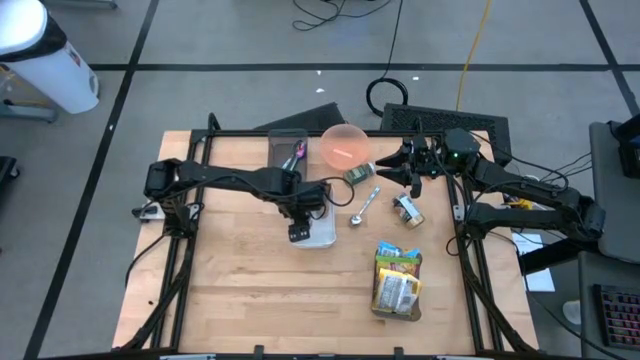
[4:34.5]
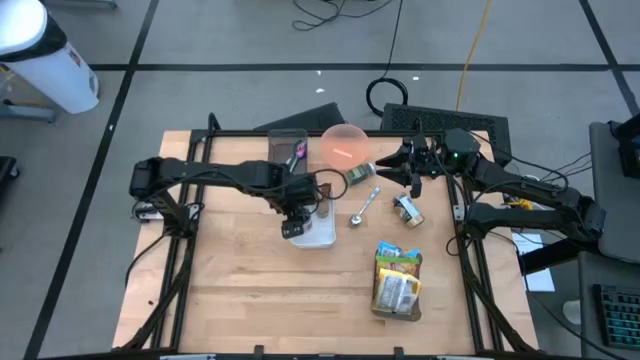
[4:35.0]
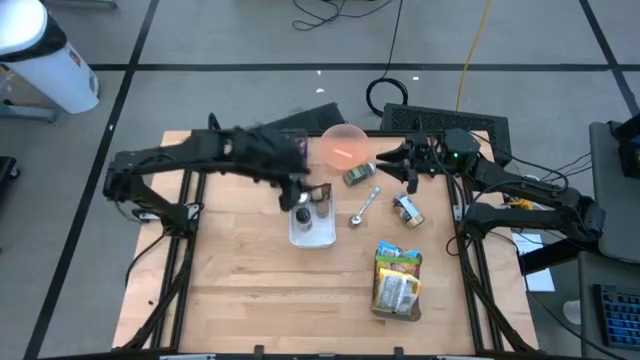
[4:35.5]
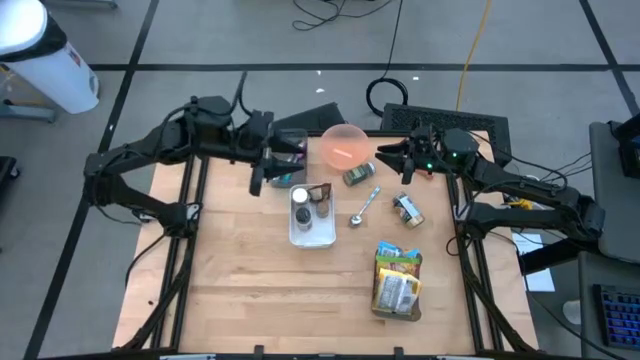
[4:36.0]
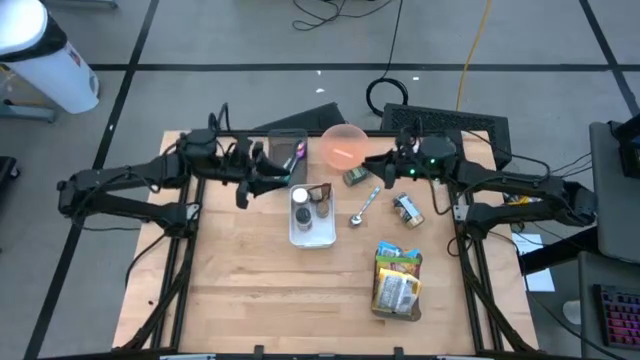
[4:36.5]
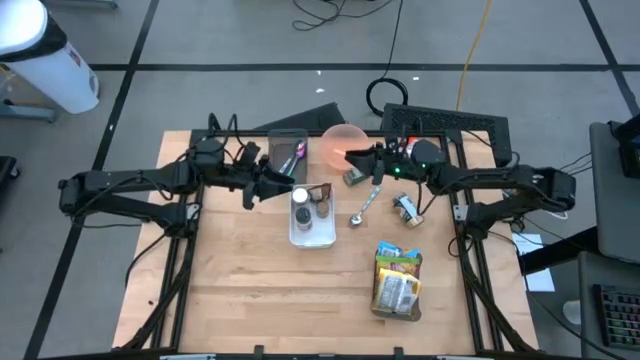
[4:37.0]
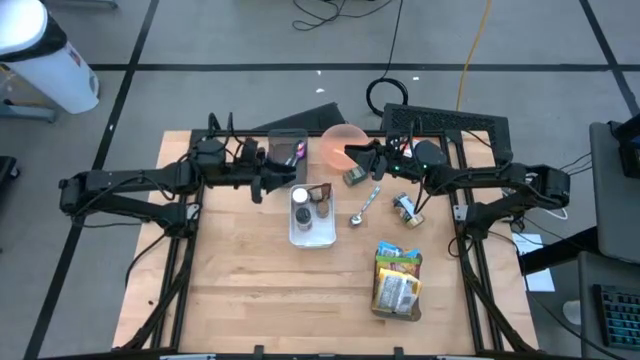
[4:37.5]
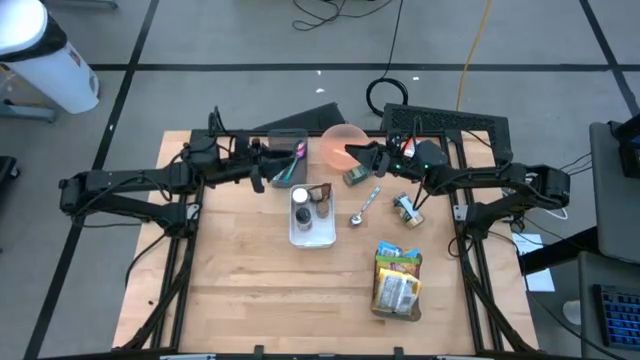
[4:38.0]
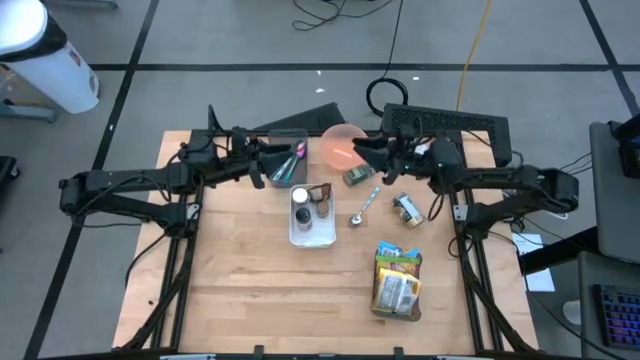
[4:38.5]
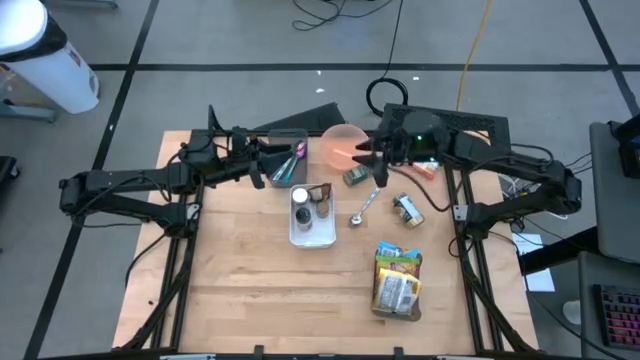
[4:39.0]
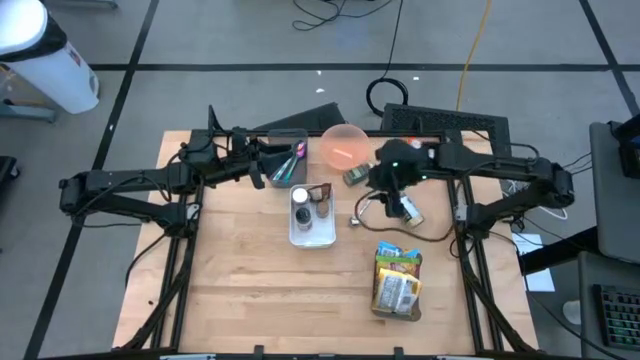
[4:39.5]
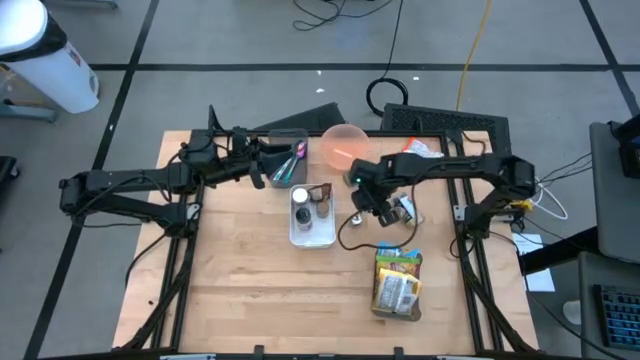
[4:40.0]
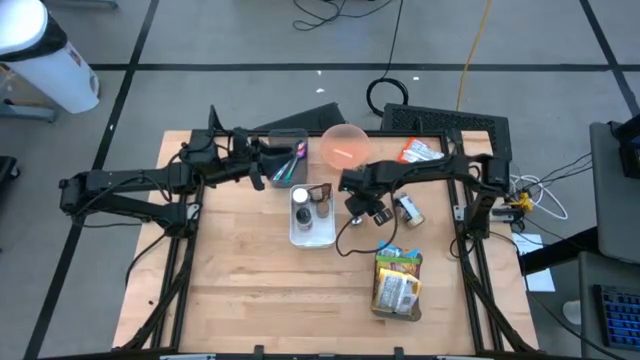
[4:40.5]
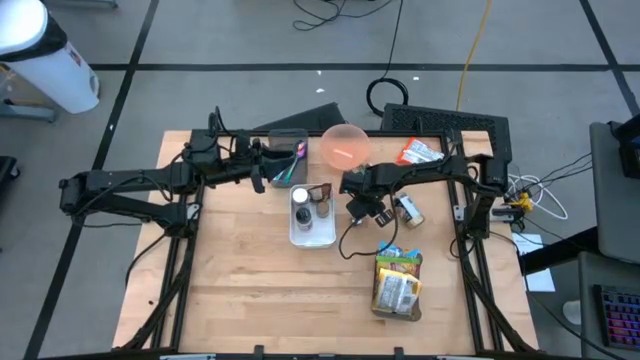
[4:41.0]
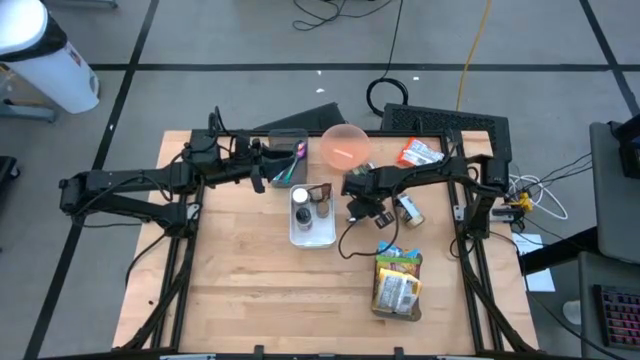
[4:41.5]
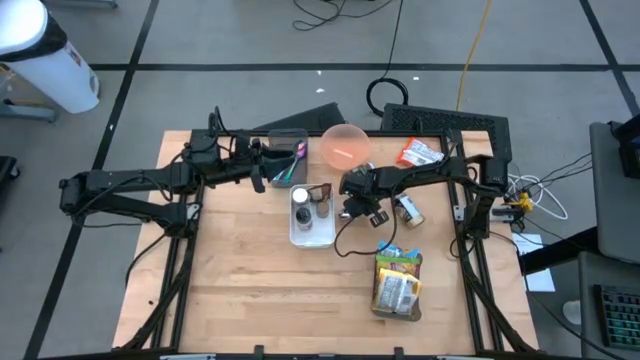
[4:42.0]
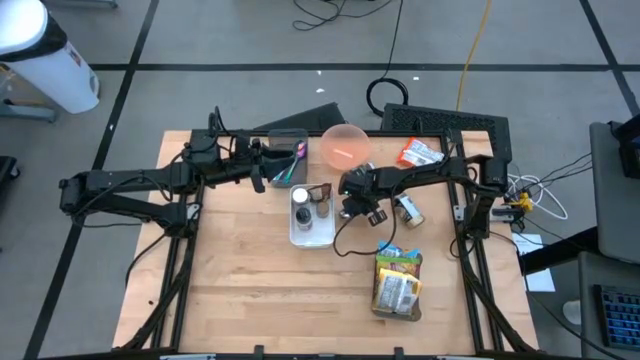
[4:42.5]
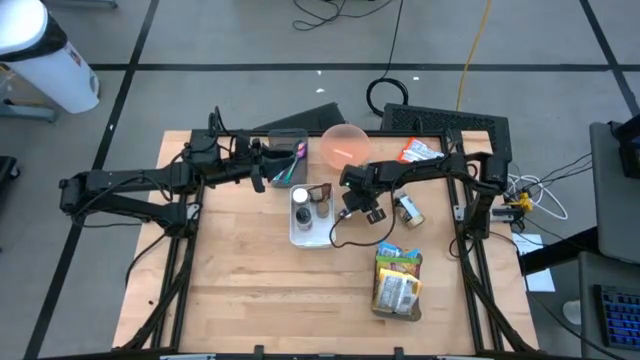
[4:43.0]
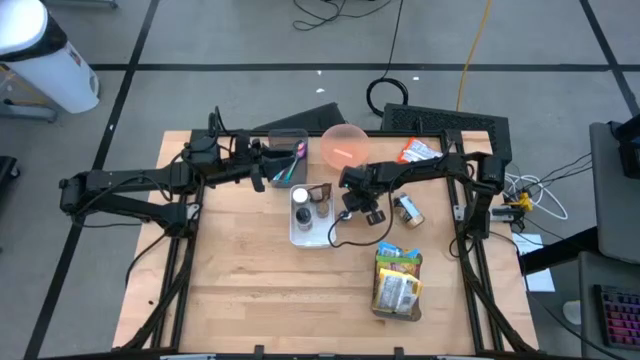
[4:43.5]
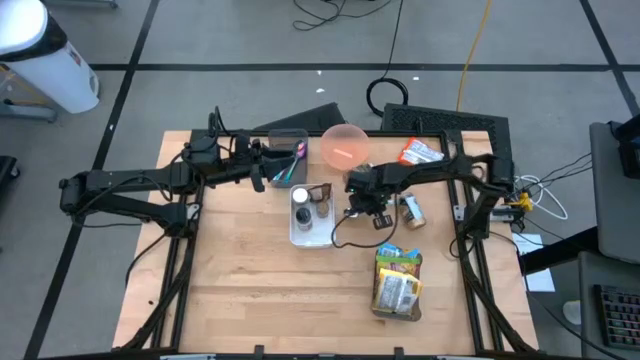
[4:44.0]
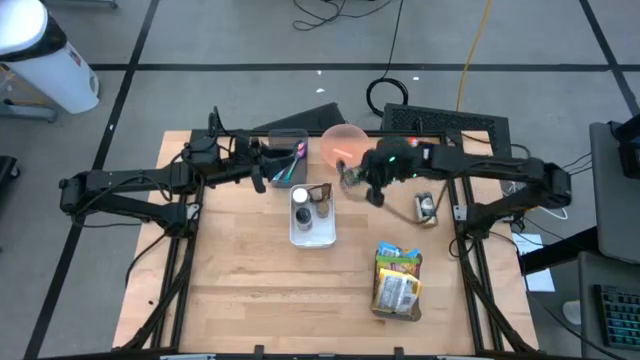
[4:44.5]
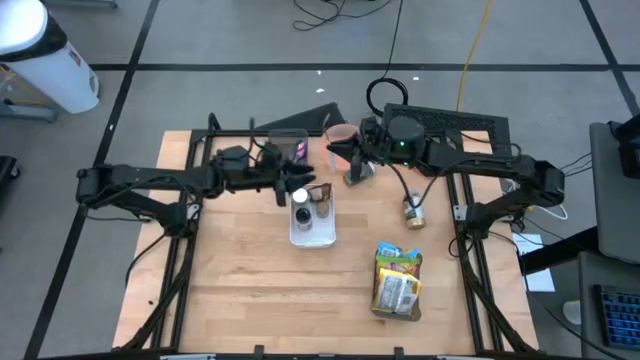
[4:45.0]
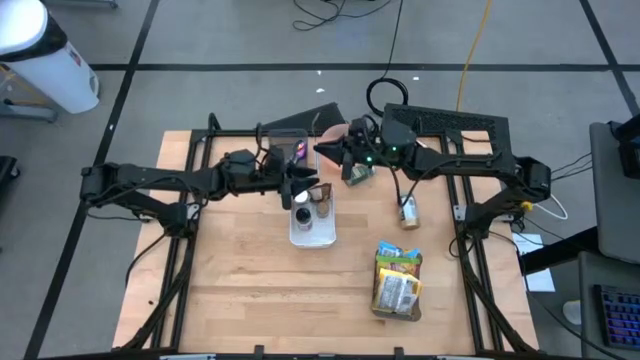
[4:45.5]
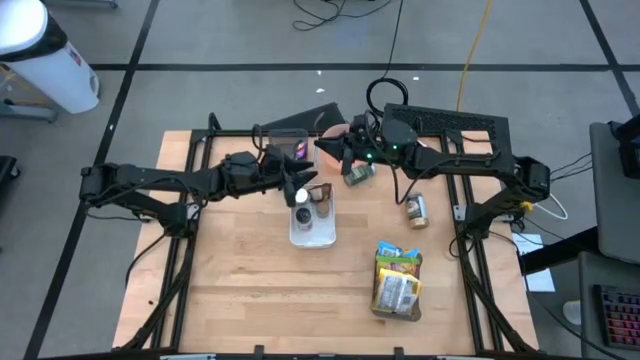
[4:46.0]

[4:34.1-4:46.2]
Task: Pick & Place Food Item
Put the blue pattern spoon into the top black transparent bin

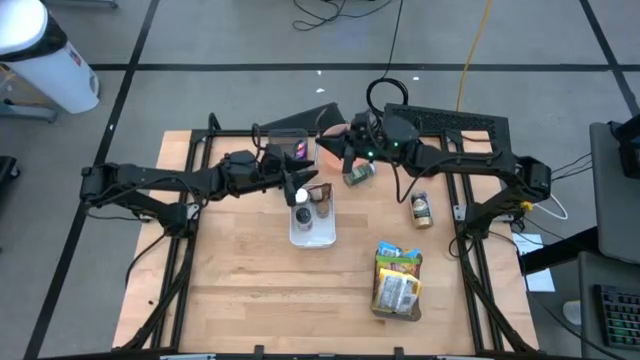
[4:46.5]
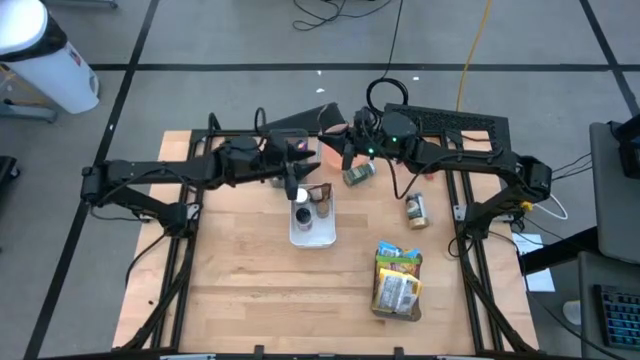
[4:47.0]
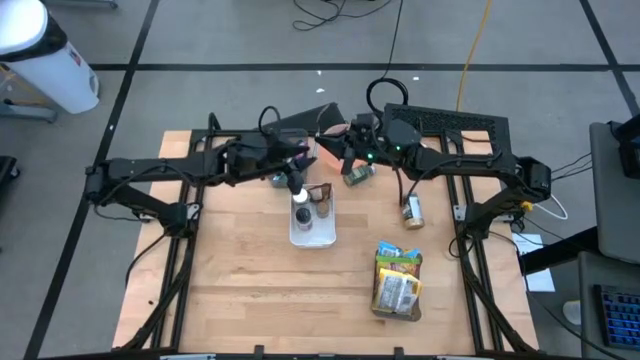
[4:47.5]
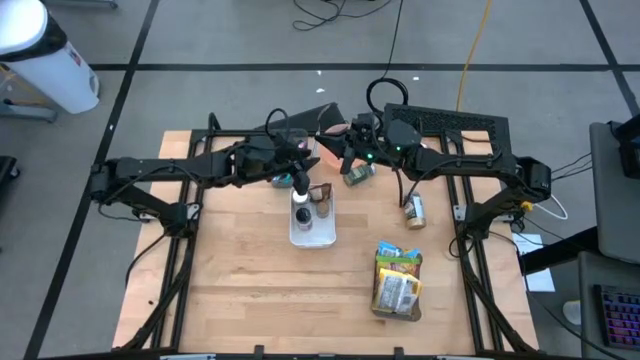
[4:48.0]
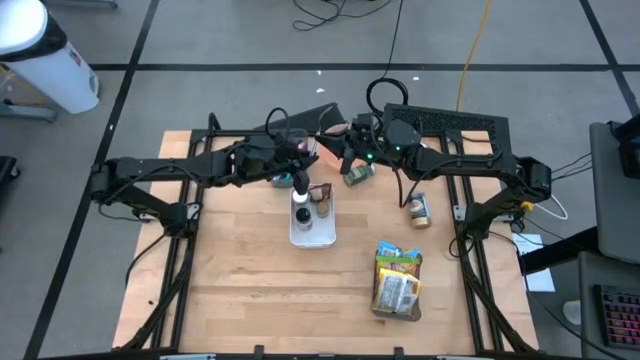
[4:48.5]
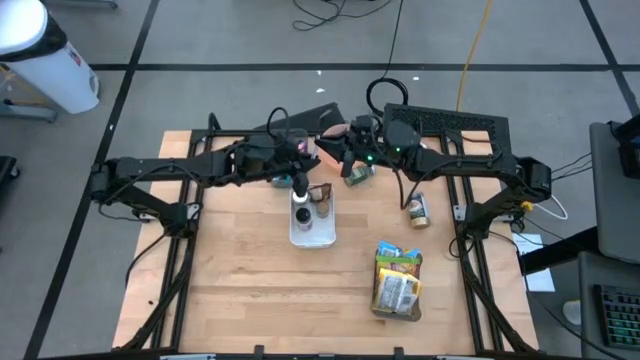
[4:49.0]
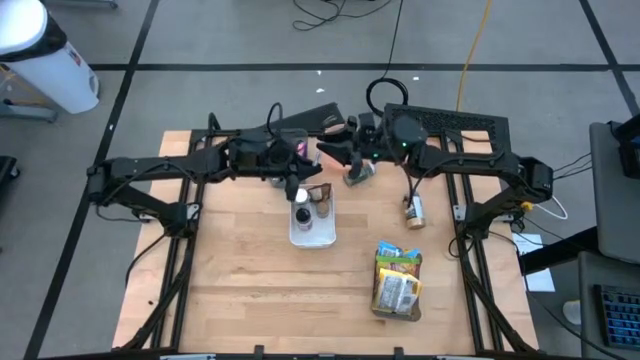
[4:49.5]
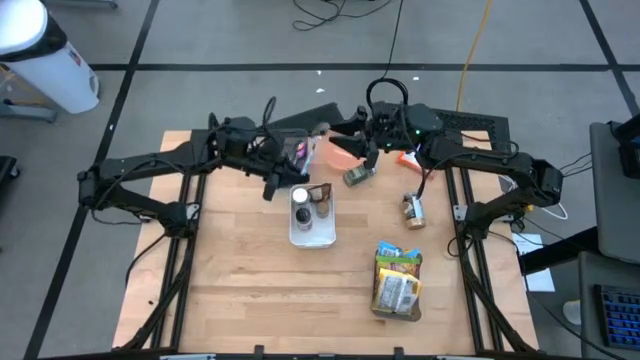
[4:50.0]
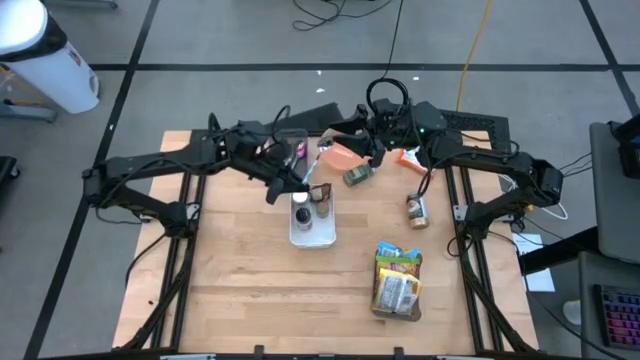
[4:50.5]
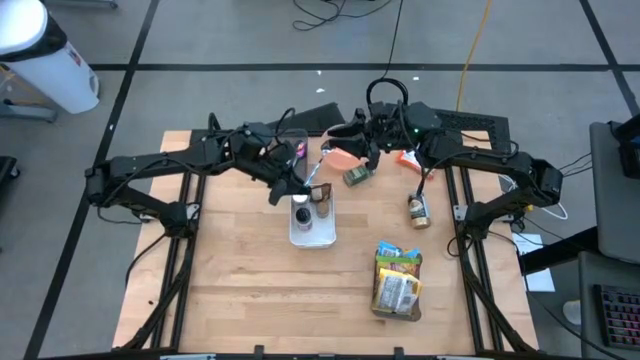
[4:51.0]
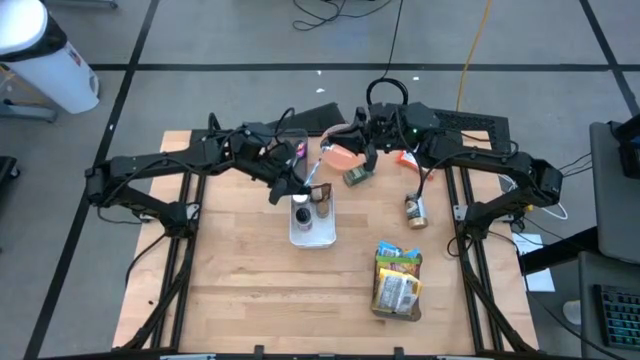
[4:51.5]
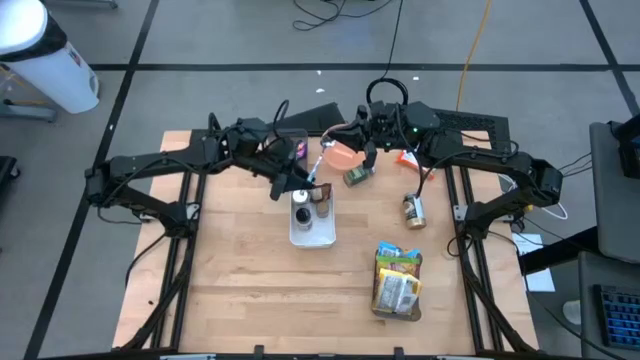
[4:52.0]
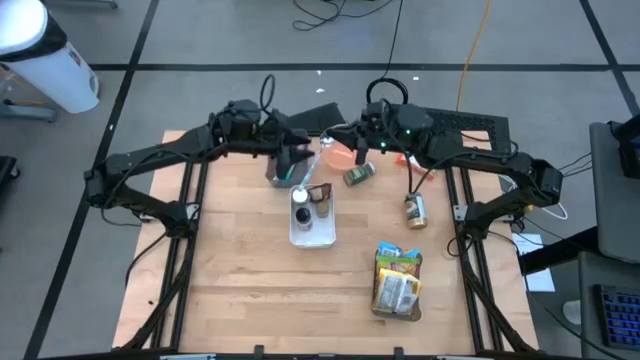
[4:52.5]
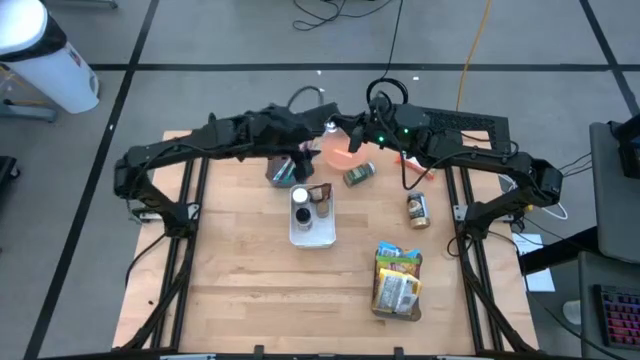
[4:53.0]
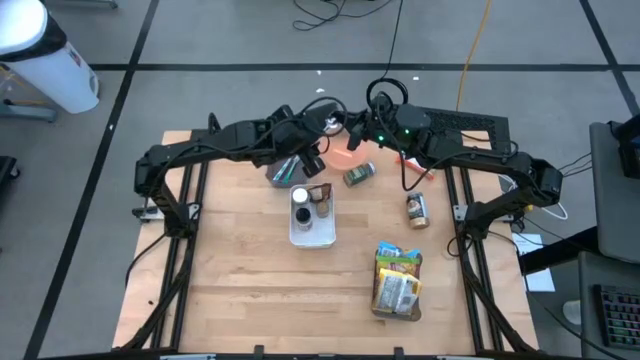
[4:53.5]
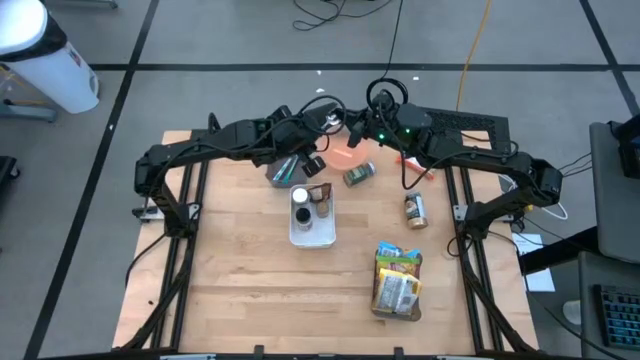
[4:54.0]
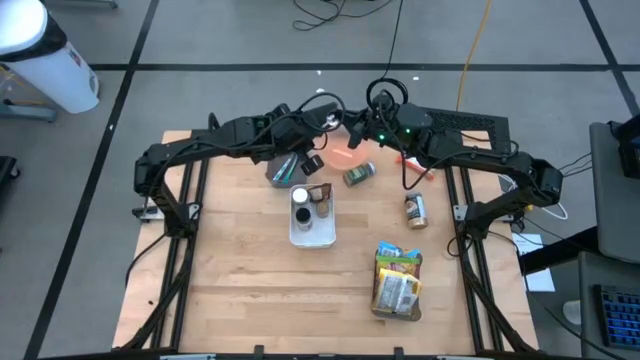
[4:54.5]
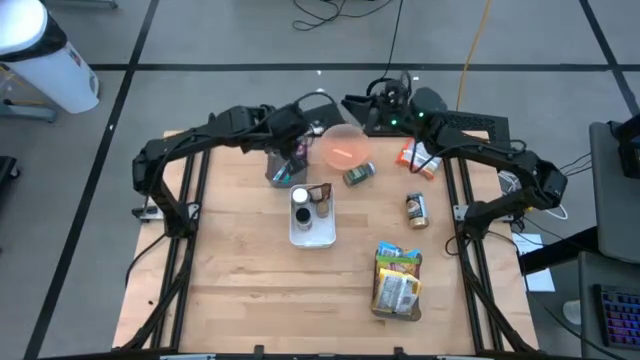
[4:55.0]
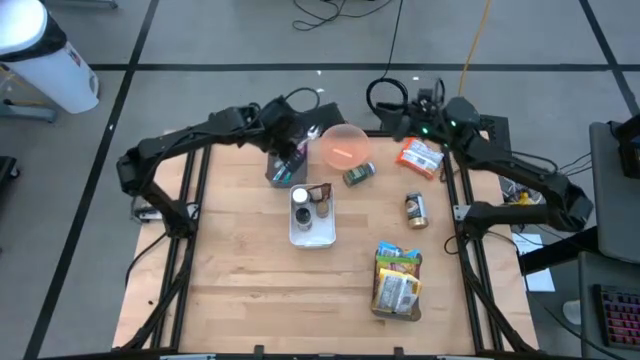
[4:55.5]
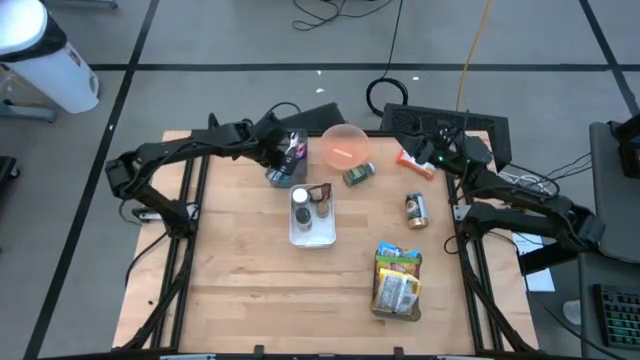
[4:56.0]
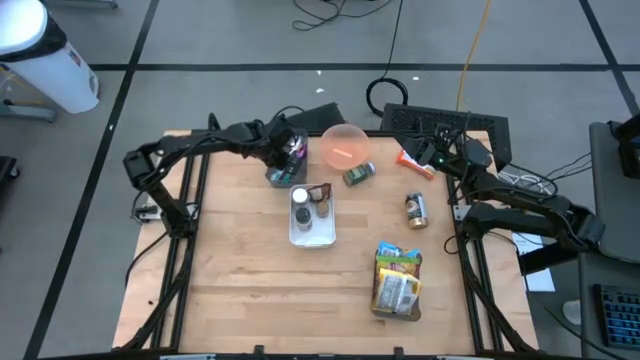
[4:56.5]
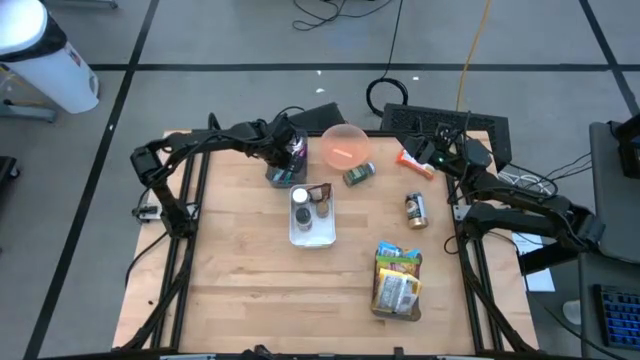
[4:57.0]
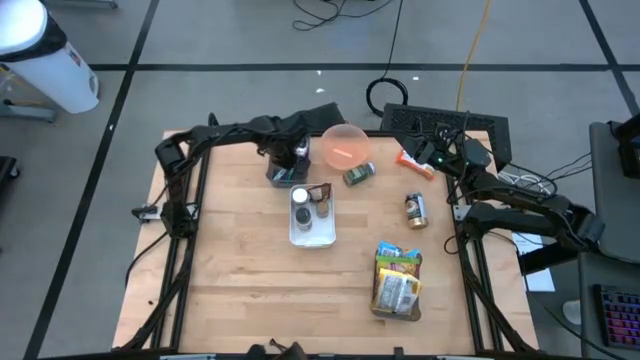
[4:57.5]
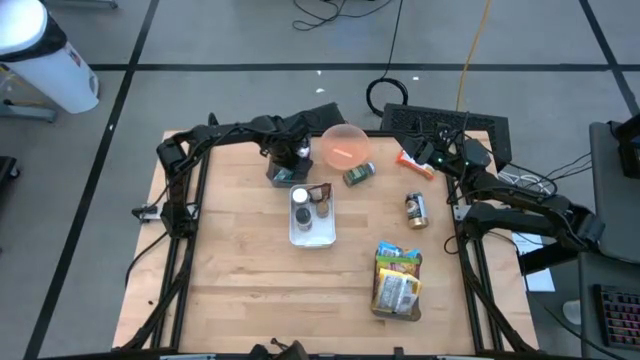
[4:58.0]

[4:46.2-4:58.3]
Put the blue pattern spoon into the top black transparent bin
